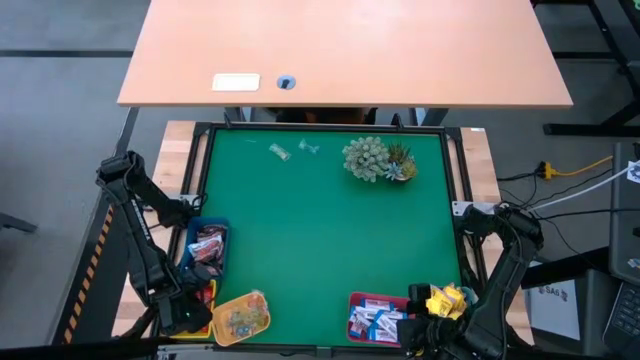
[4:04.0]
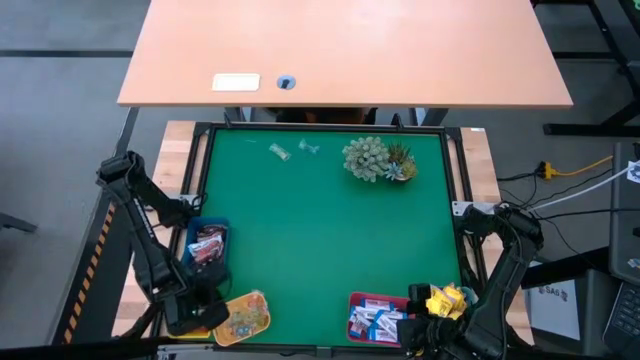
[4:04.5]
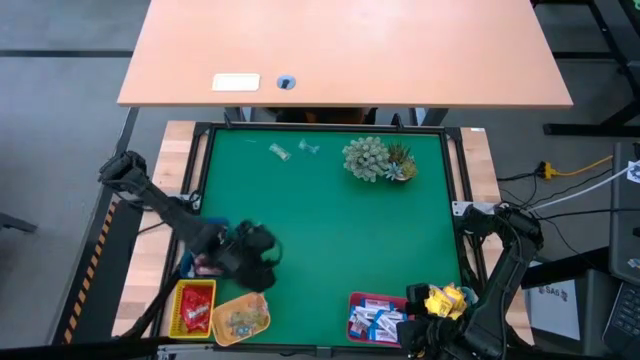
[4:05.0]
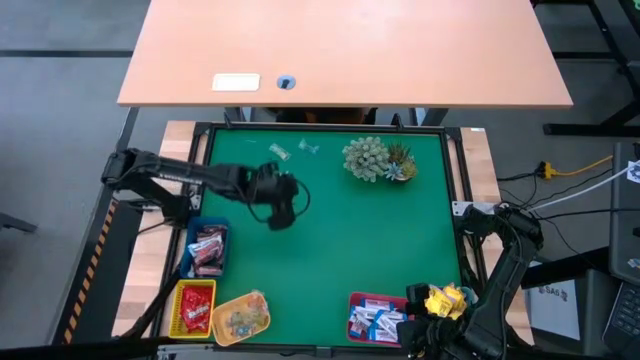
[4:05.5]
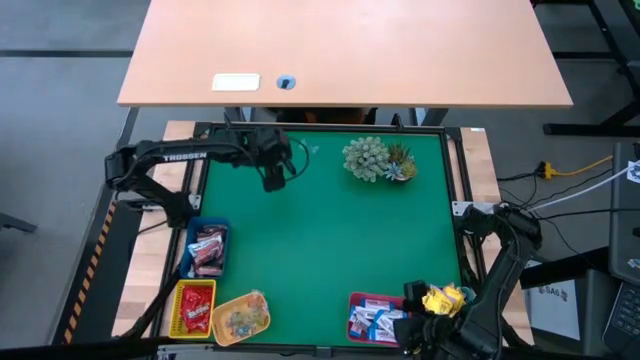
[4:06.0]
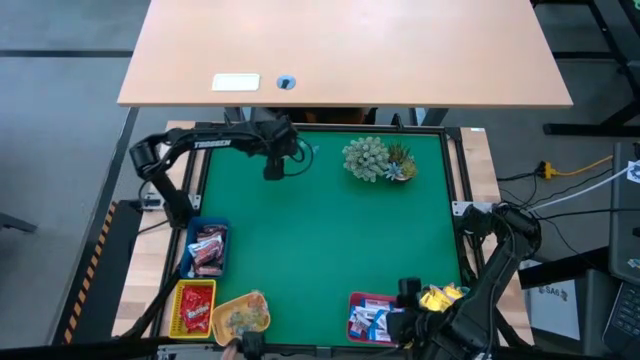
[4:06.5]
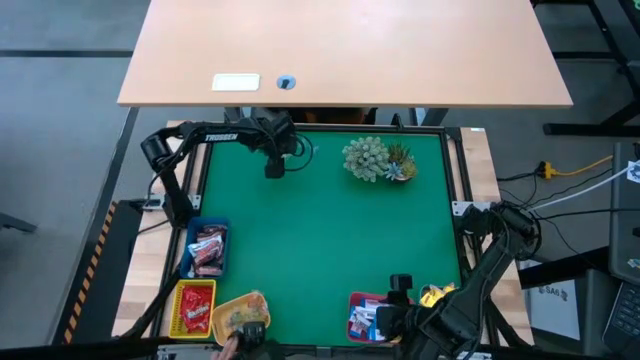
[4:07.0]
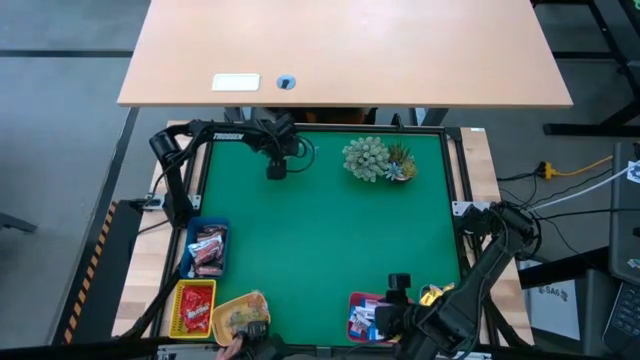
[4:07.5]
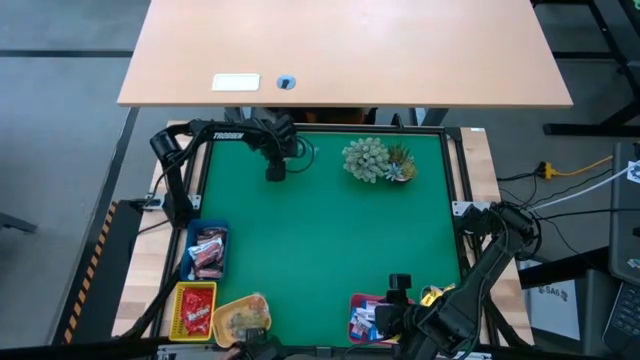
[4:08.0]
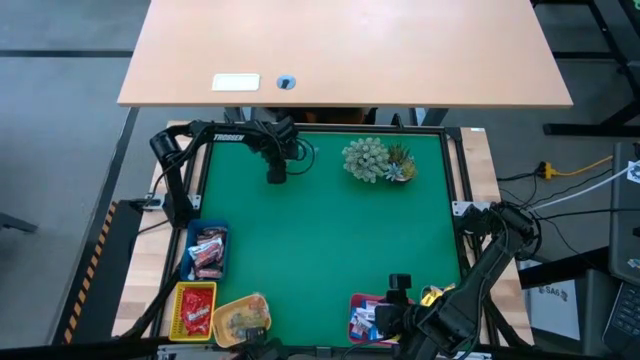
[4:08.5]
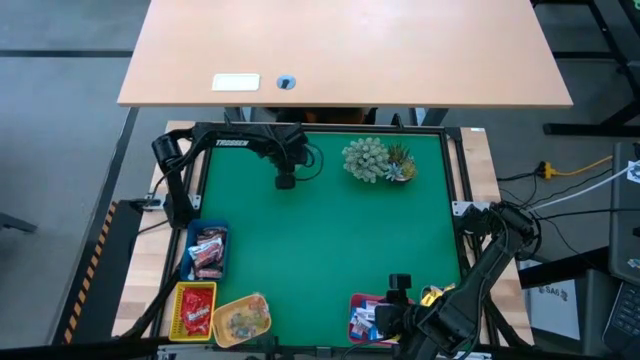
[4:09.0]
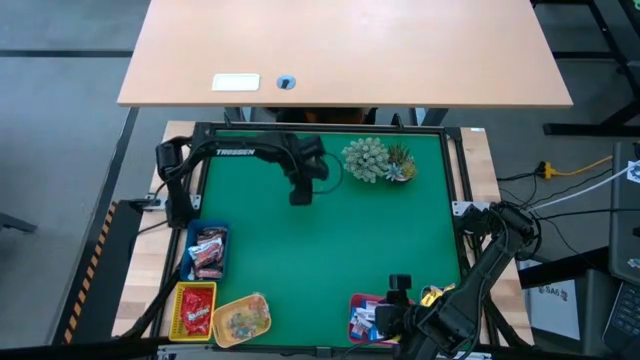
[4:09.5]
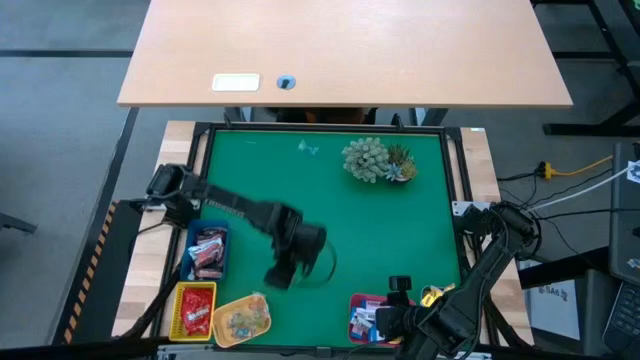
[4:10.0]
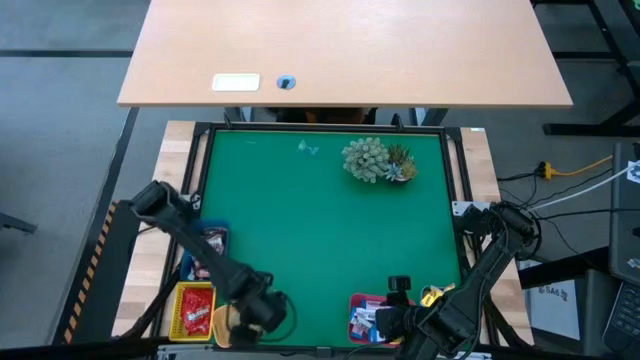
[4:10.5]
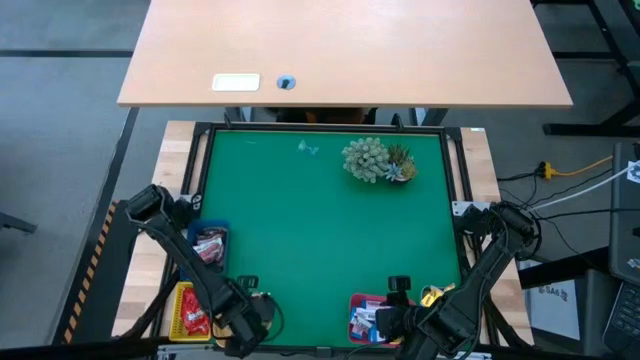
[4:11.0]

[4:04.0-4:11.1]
Task: Sort candy
Put the transparent candy into the orange bin

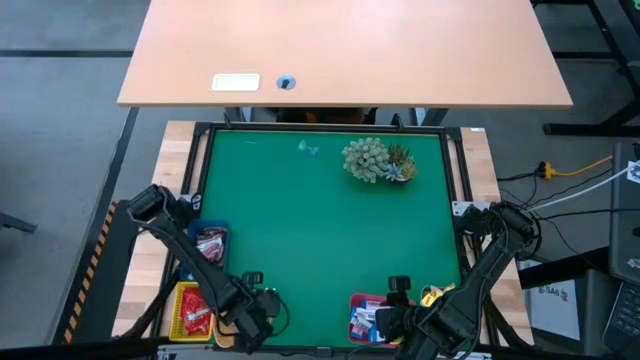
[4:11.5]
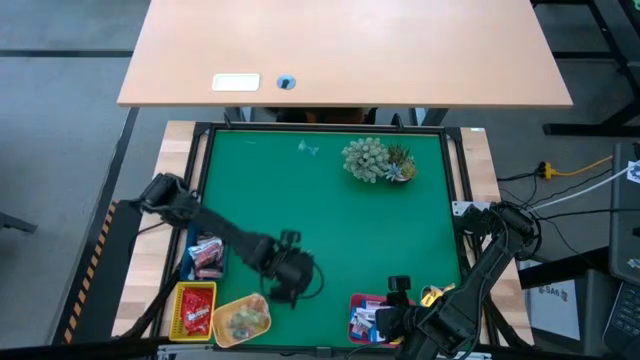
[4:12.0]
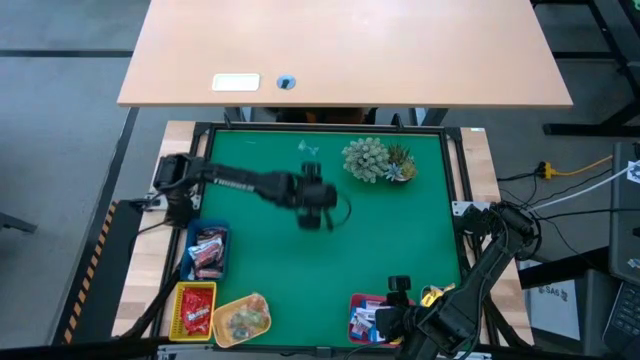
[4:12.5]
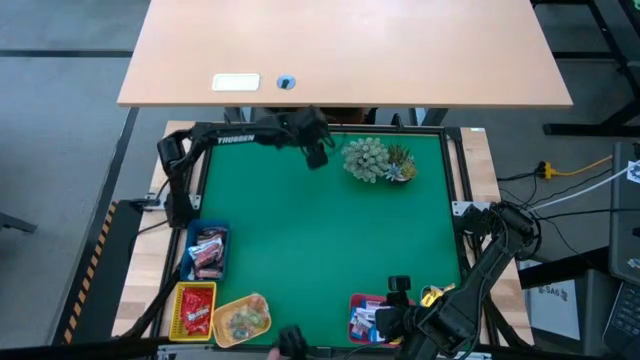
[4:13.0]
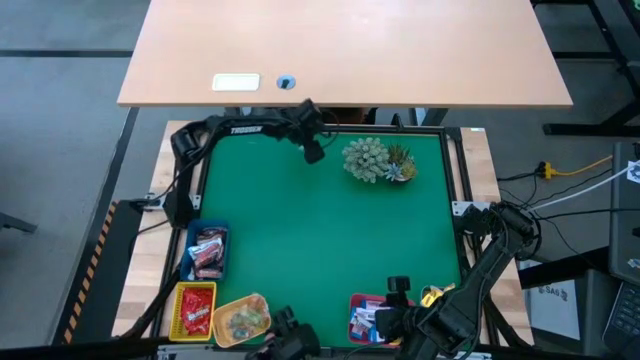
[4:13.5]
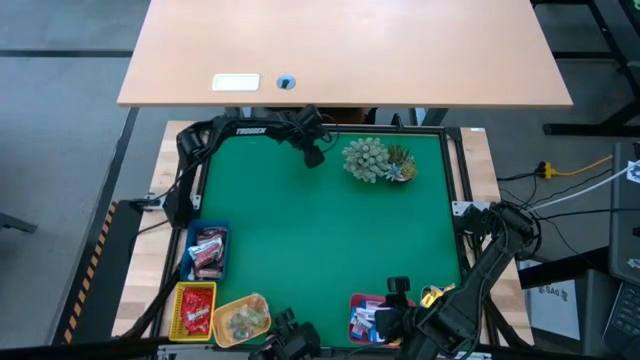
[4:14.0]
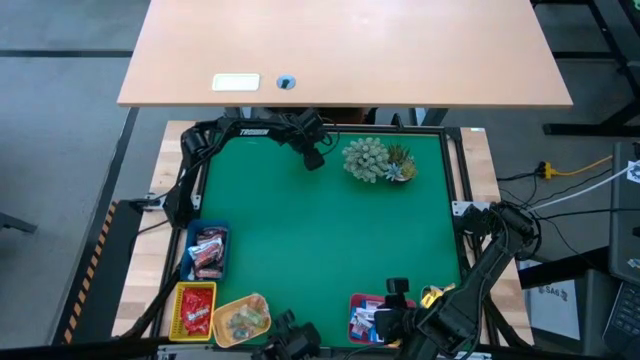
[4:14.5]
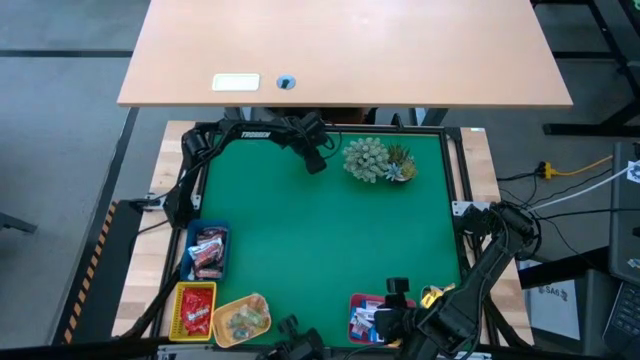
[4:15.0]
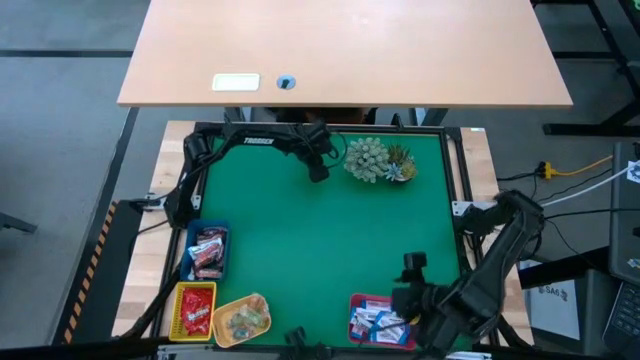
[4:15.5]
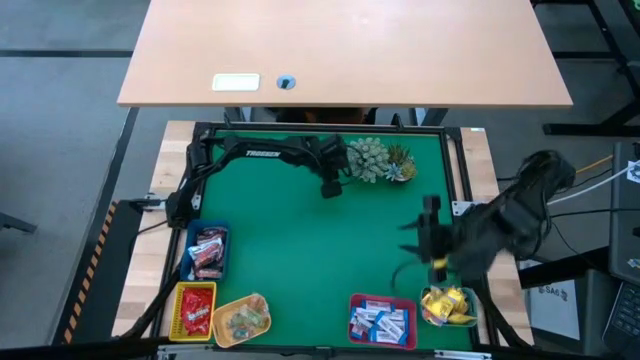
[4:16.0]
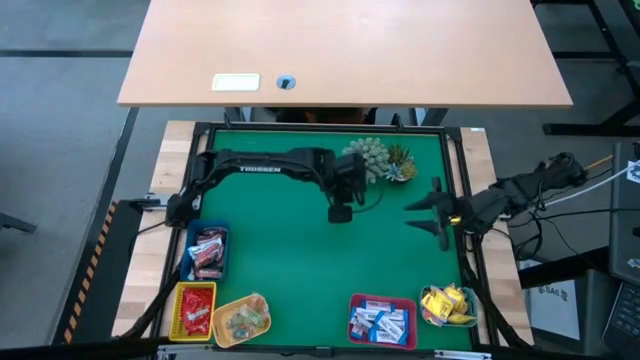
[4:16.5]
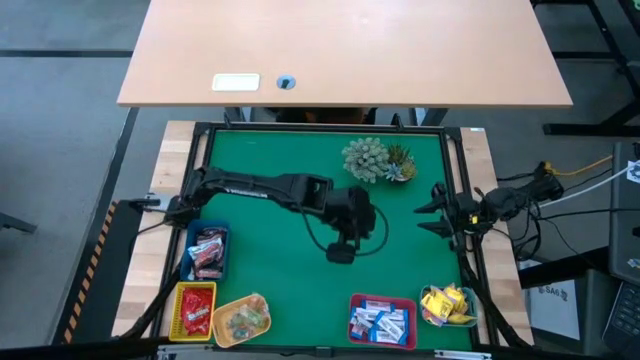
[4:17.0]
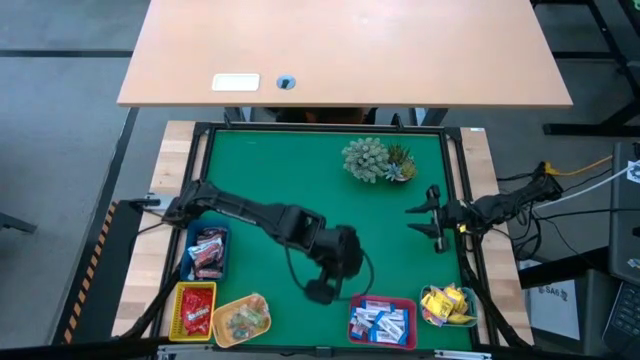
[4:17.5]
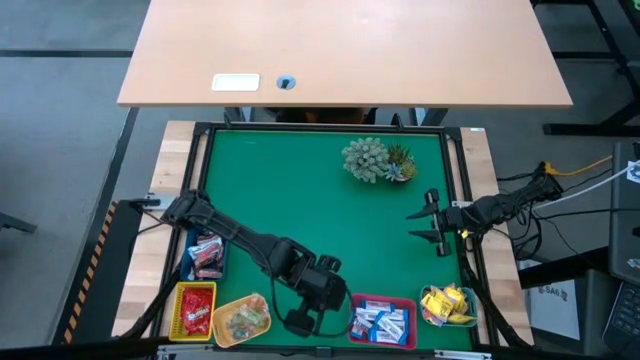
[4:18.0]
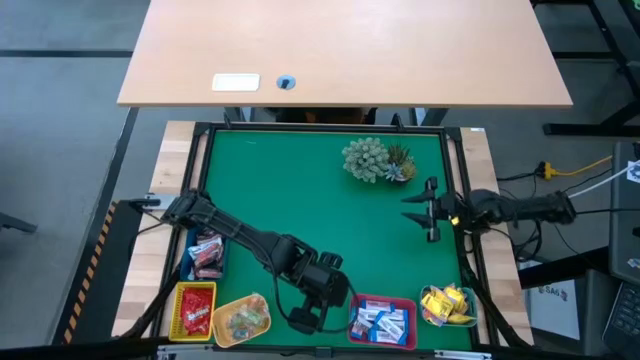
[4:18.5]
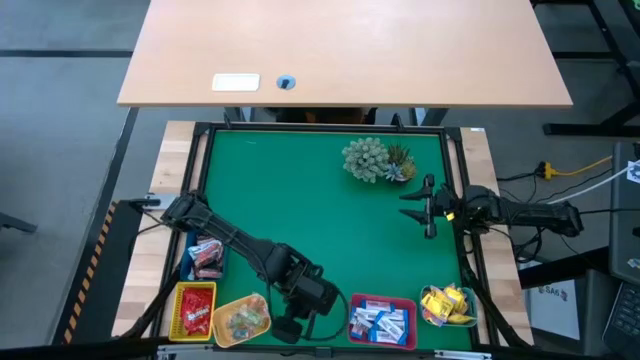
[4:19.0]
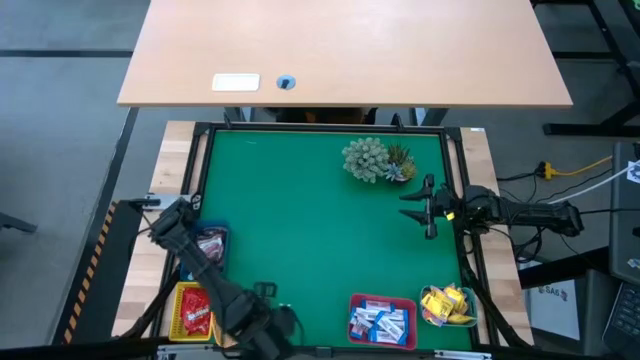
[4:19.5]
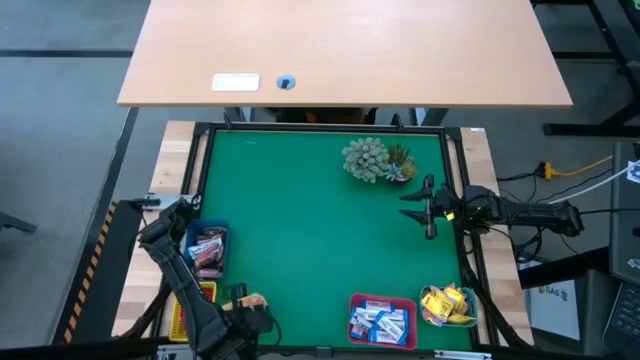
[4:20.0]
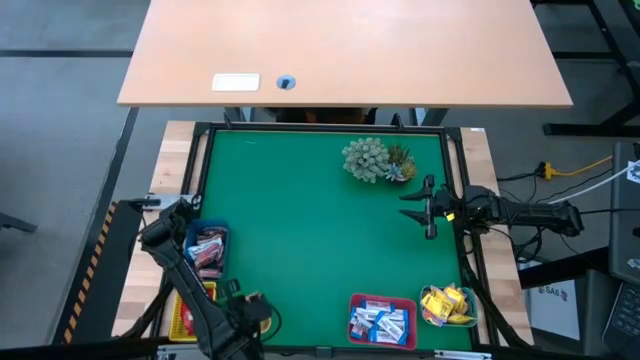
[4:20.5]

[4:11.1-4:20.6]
Put the transparent candy into the orange bin
